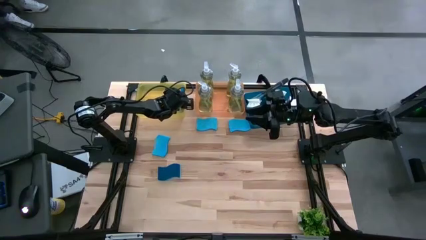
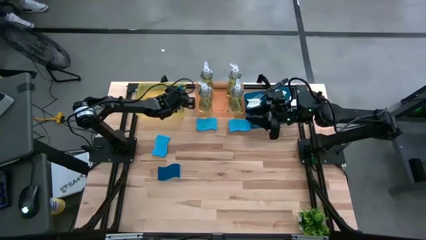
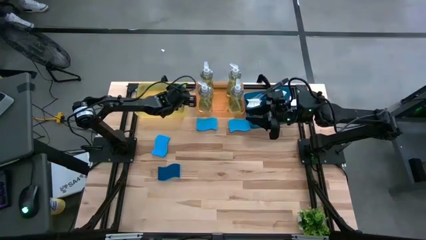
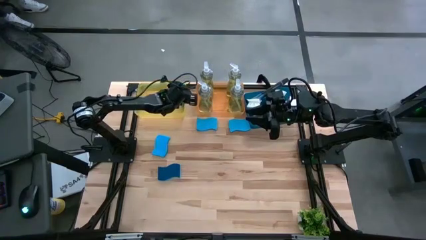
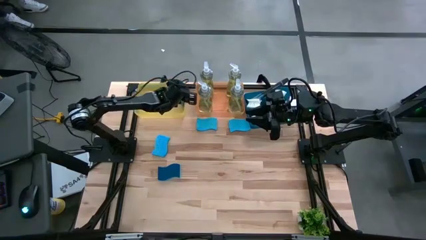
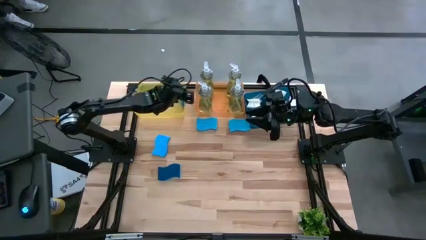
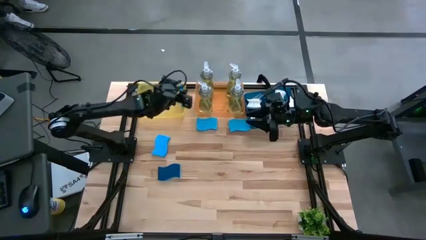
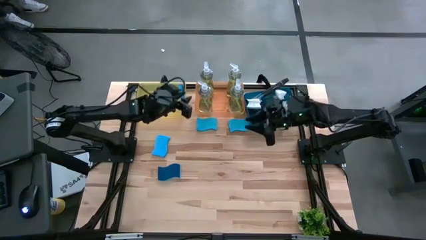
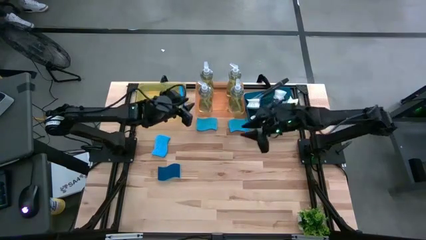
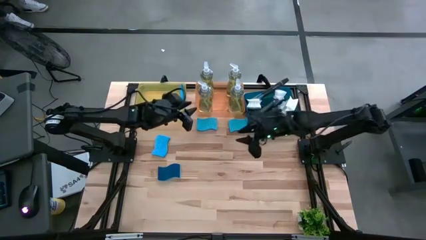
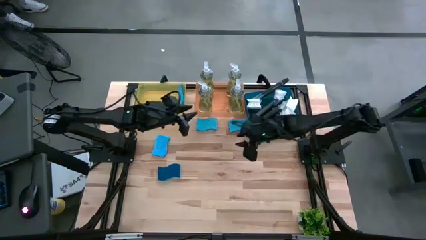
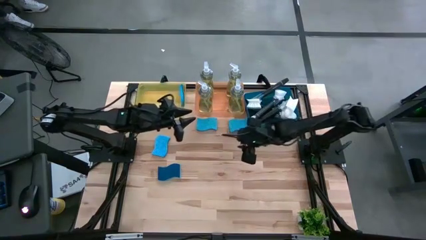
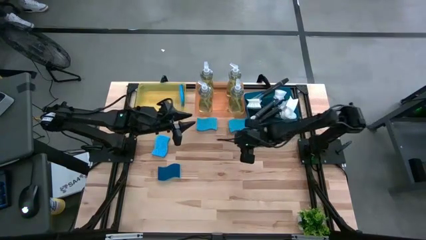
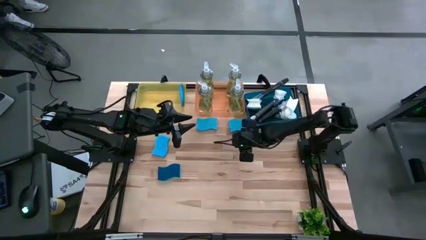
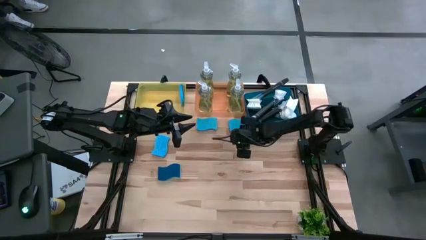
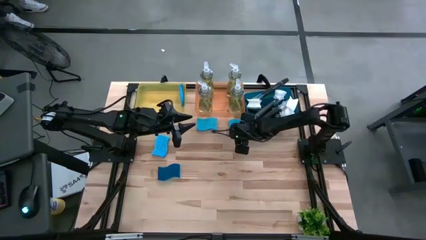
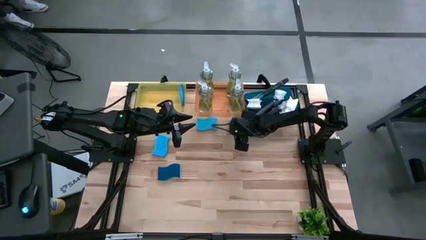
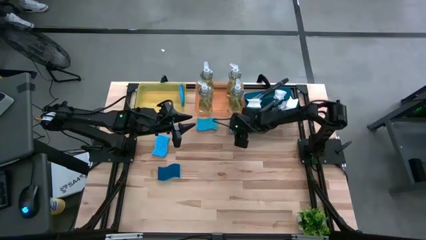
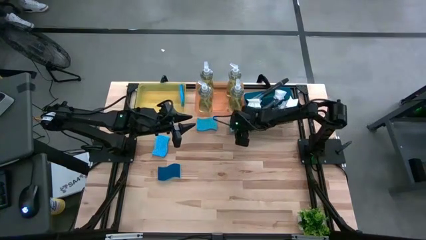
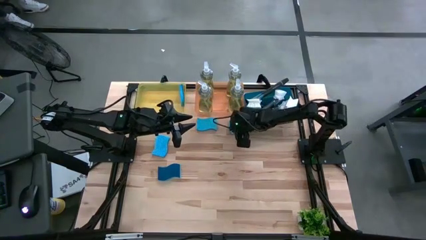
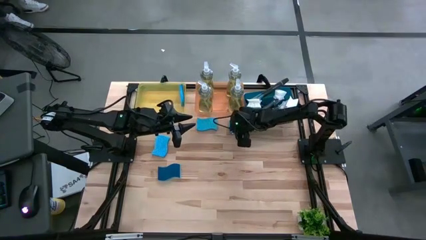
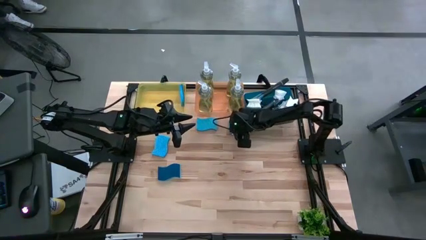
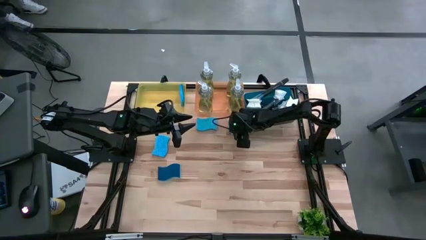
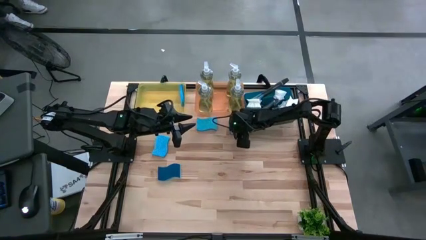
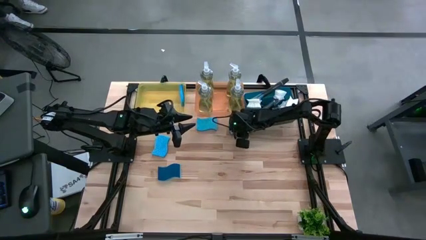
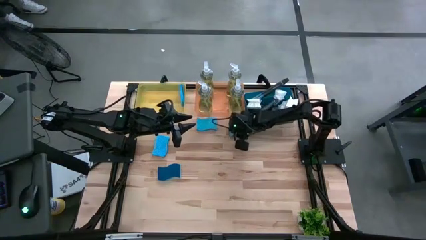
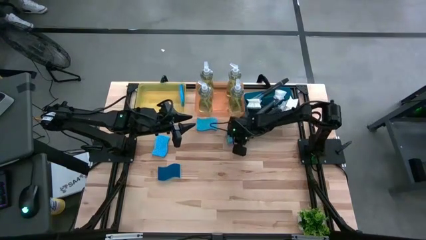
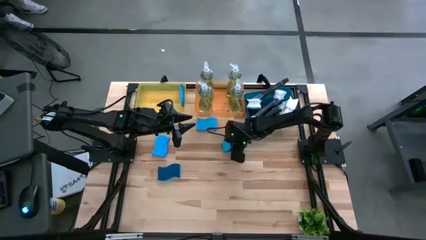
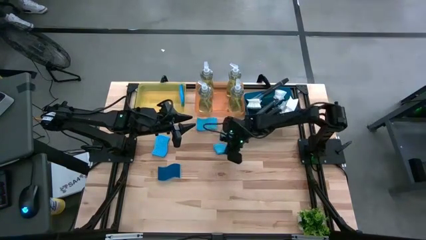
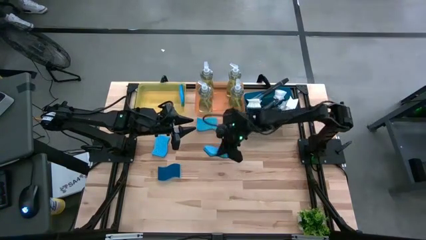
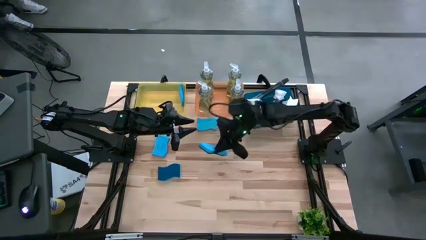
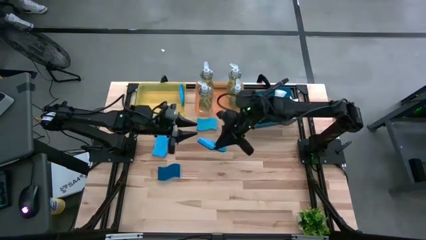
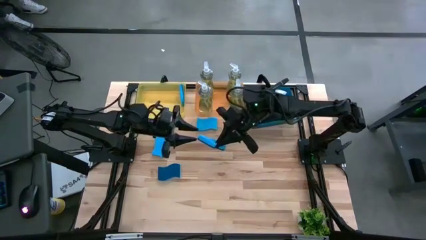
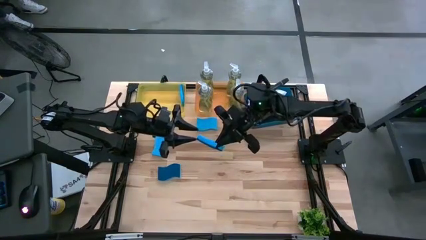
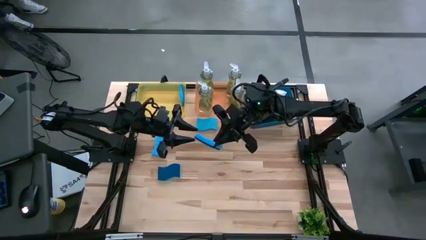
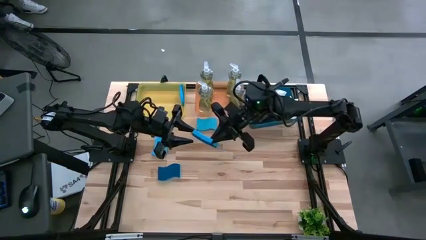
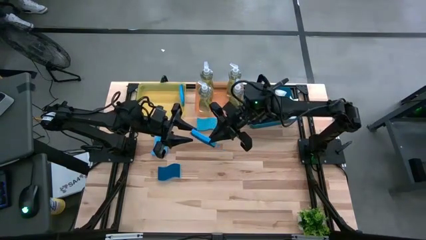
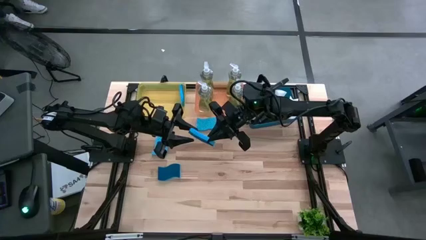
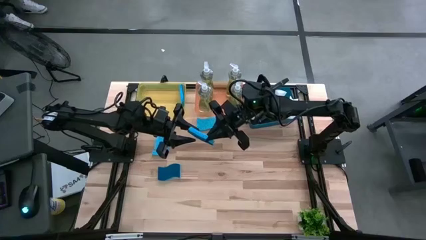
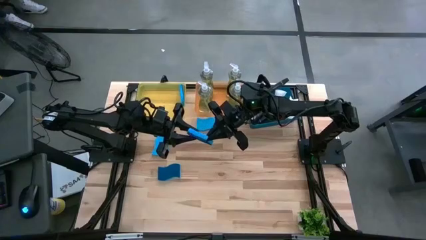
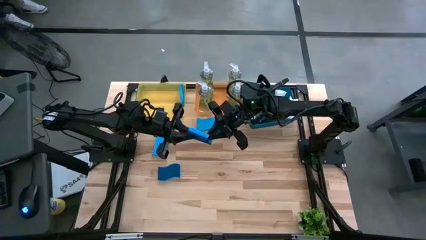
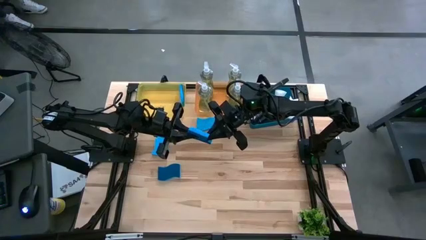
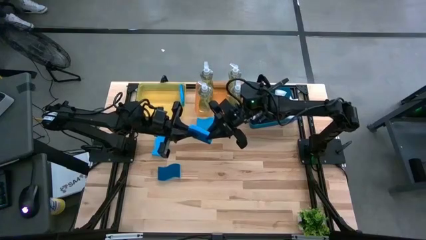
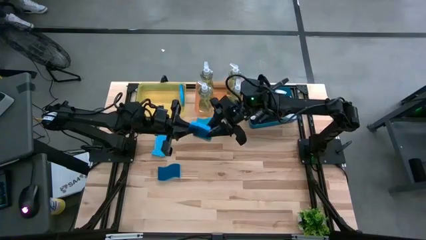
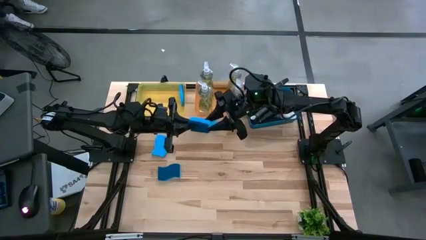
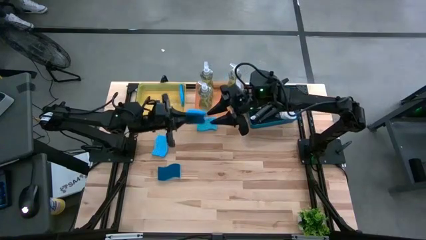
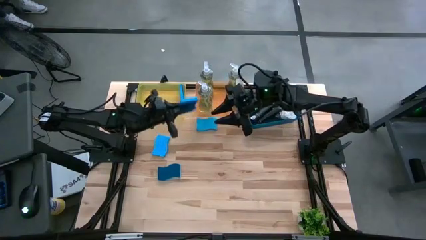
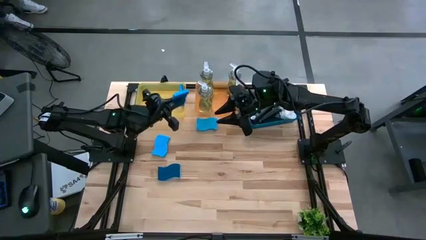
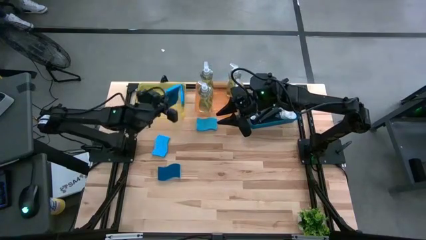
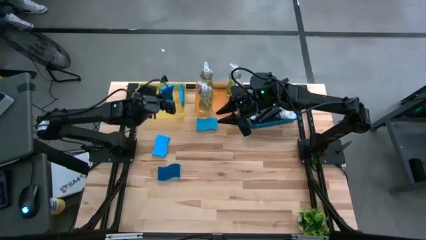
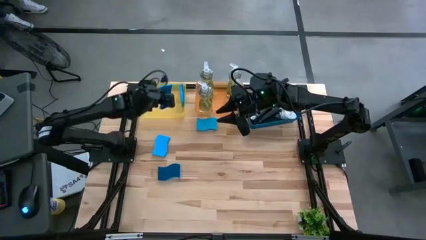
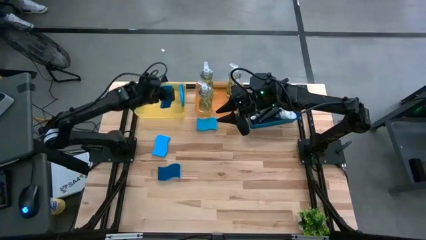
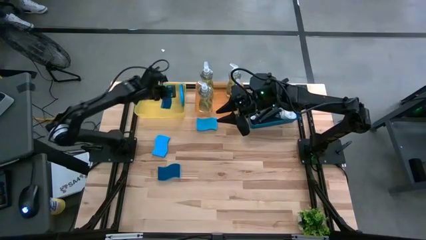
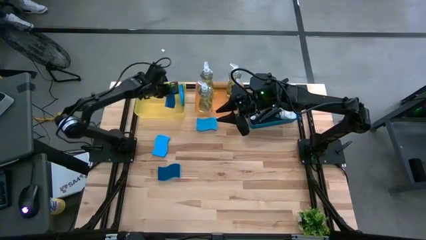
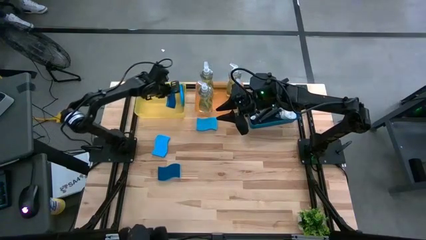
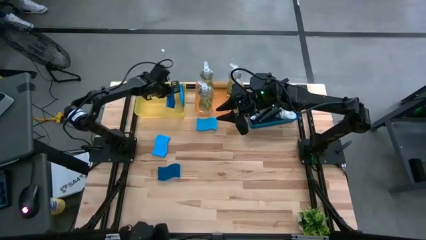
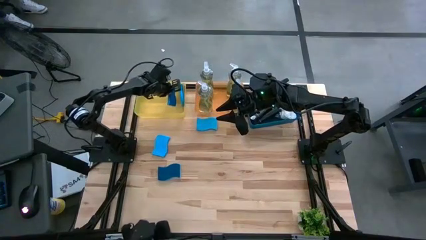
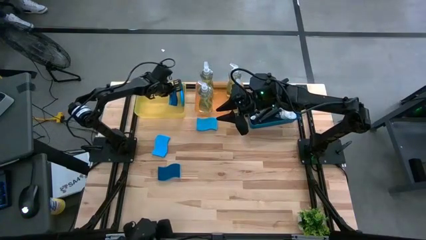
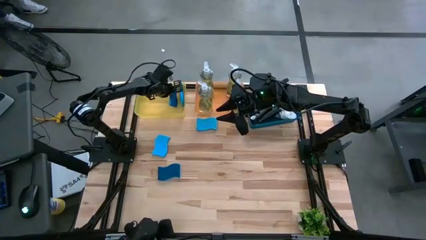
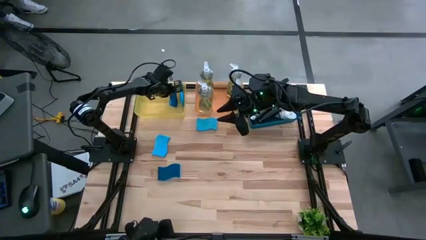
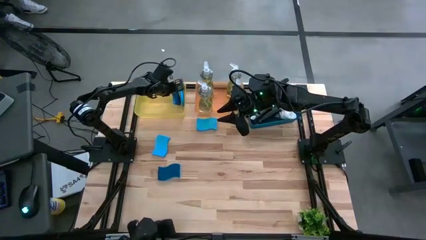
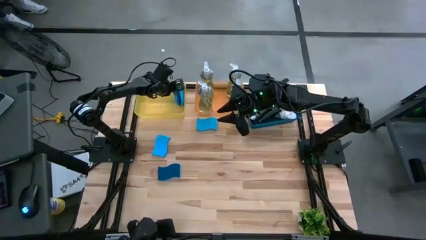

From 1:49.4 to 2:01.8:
Task: Pick & Place Kitchen Sink Supplies
Put the blue sponge into the yellow bin
